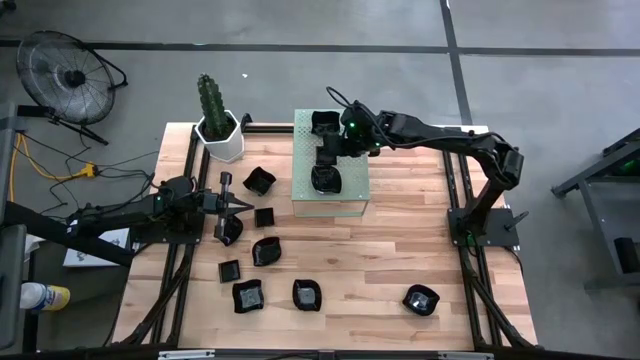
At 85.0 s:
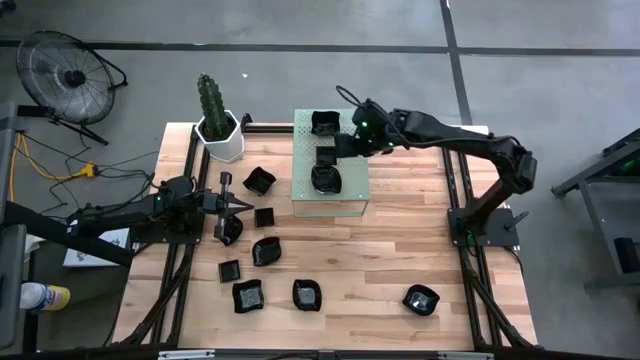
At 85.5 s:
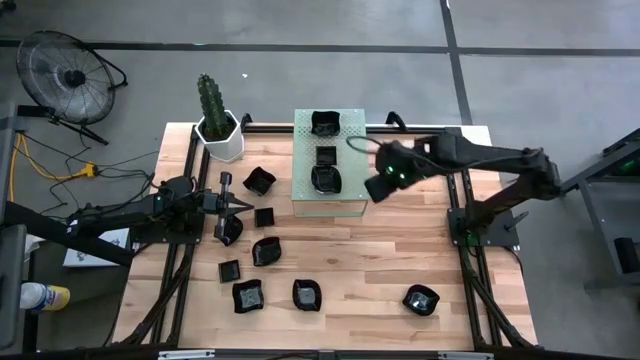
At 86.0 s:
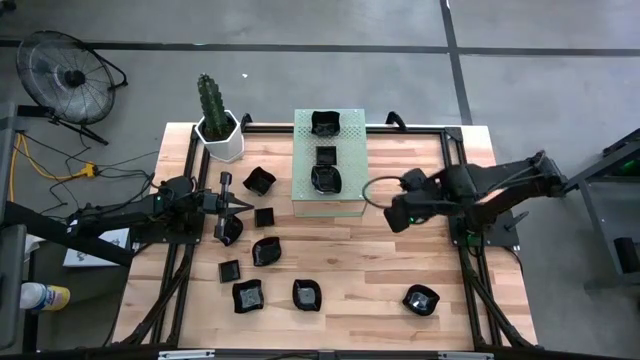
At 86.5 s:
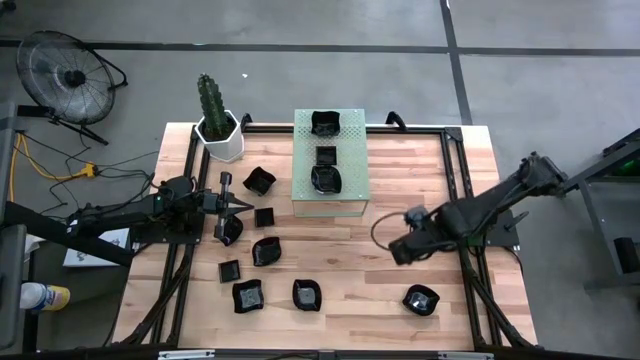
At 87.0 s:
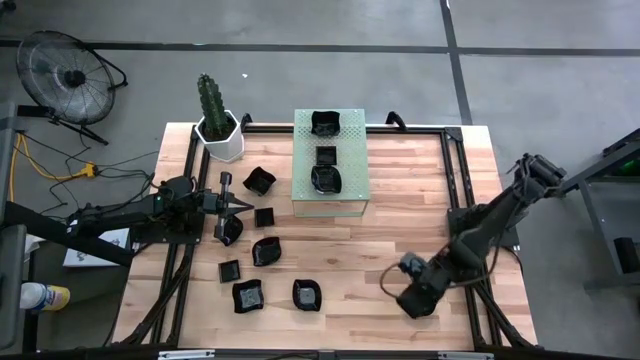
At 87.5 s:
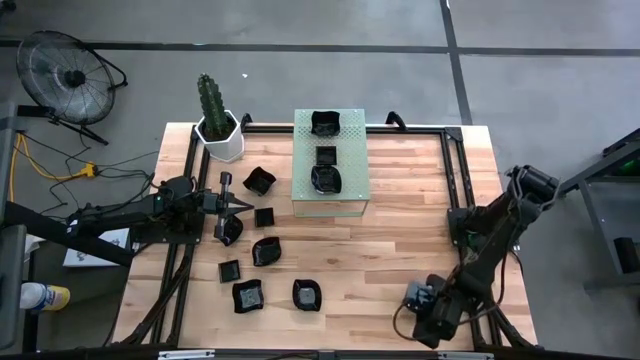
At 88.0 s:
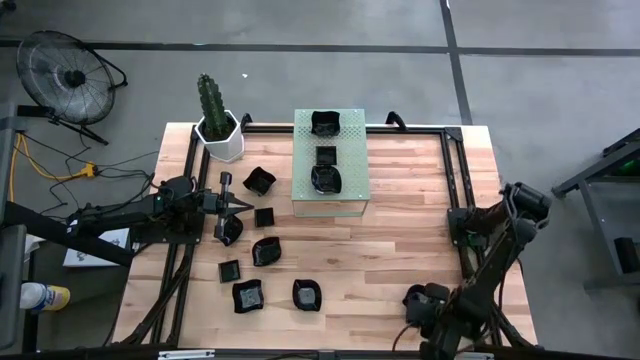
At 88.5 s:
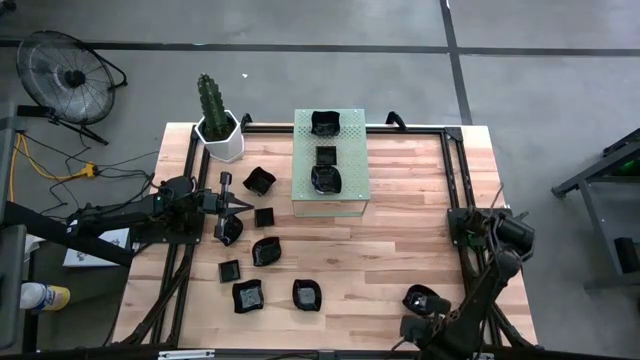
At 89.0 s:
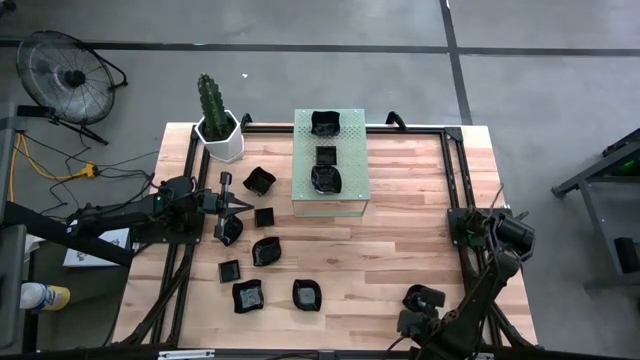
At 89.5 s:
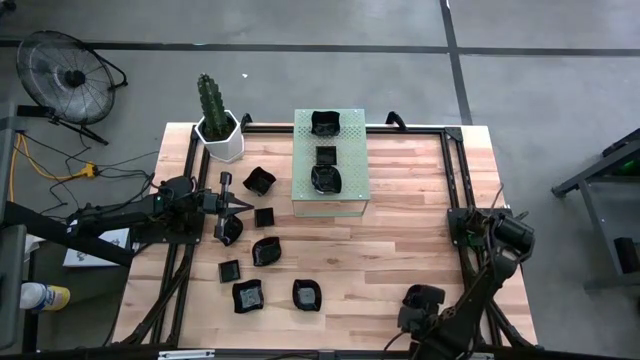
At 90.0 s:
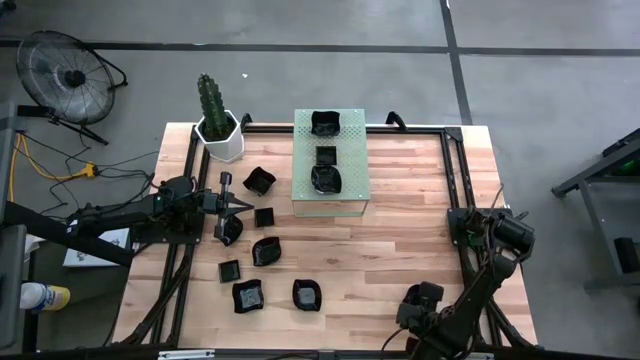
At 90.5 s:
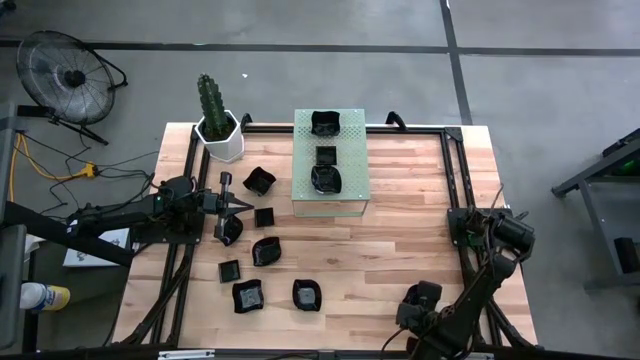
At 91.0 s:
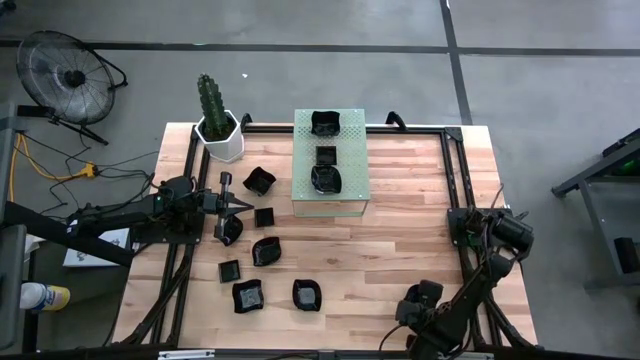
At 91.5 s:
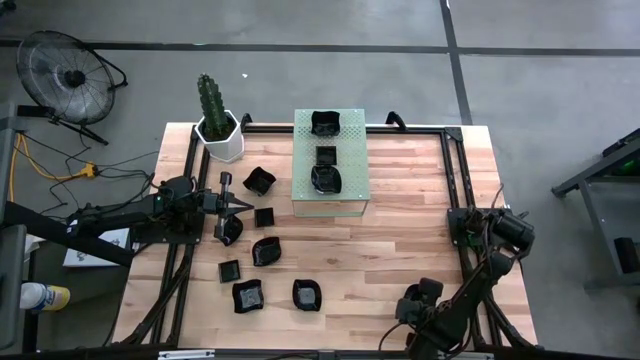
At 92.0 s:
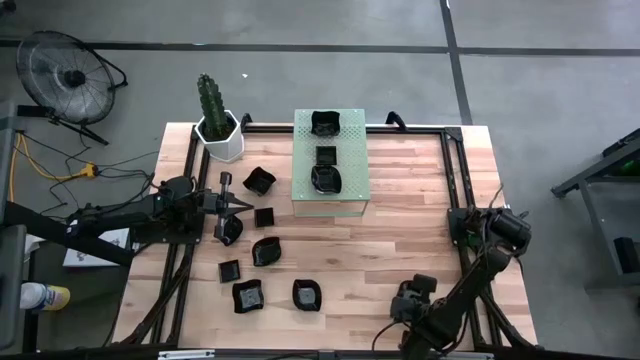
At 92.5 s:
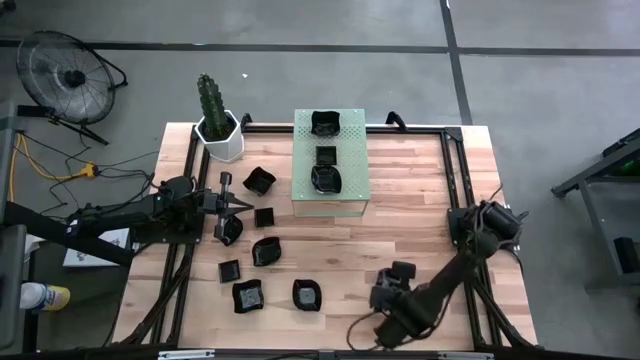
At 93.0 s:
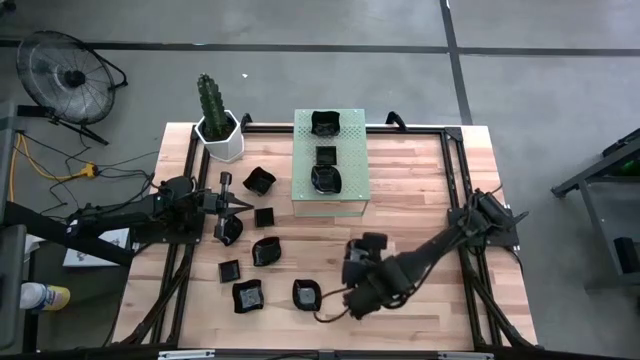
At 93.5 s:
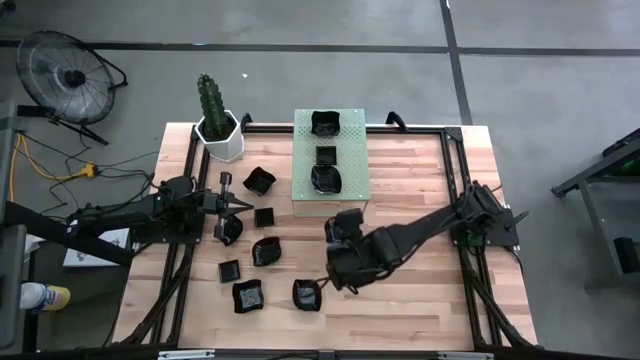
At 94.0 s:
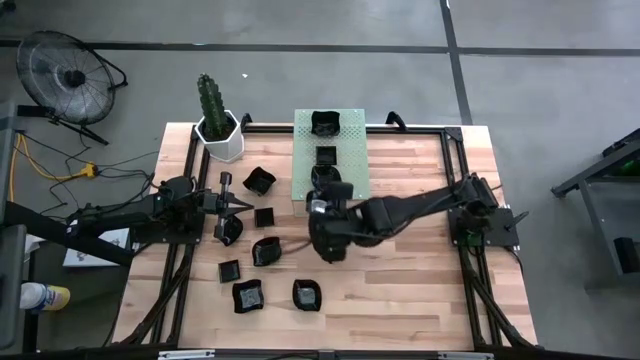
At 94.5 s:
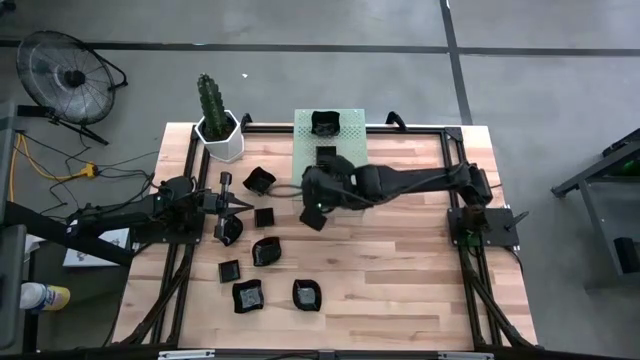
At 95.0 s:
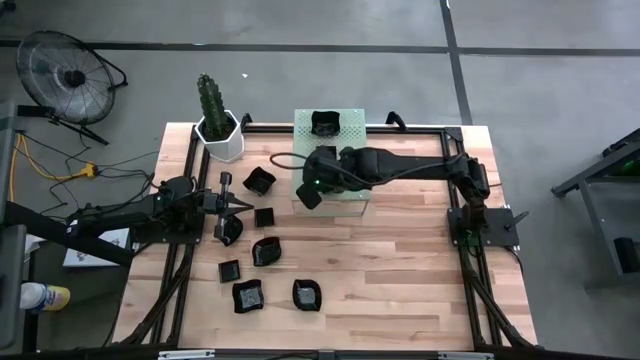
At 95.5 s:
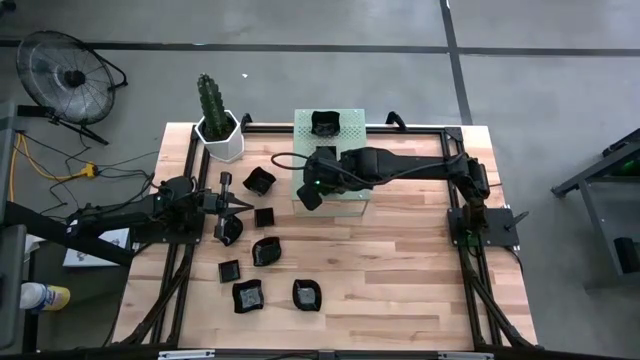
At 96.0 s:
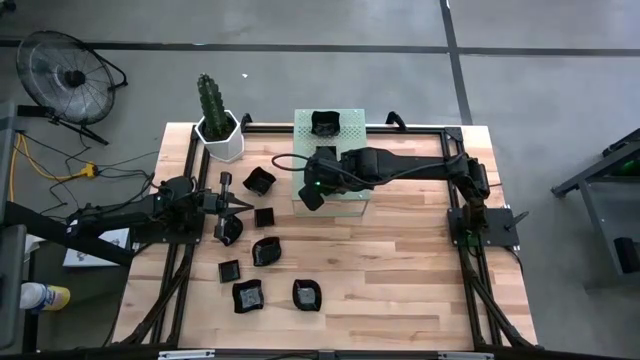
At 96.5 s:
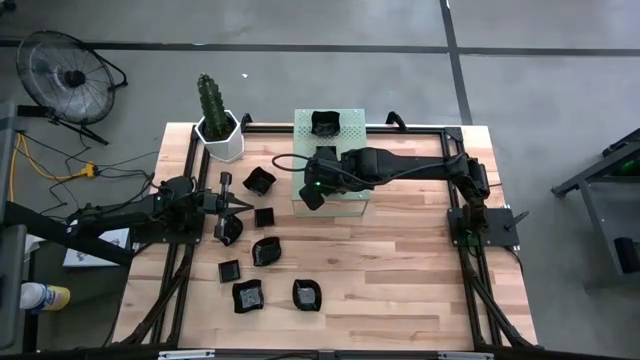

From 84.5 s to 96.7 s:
Task: Pick & Place Mini shaped plates
Stack the black leaf shaped plate on top of the black leaf shaped plate on the shelf

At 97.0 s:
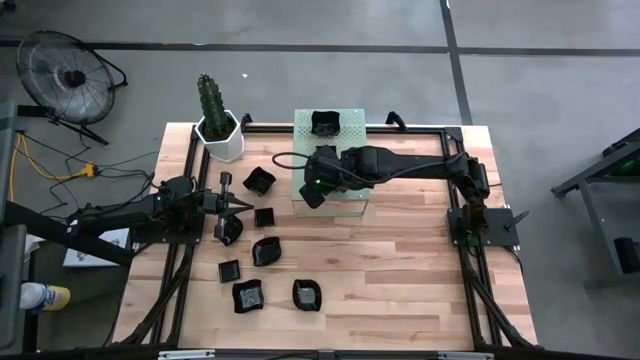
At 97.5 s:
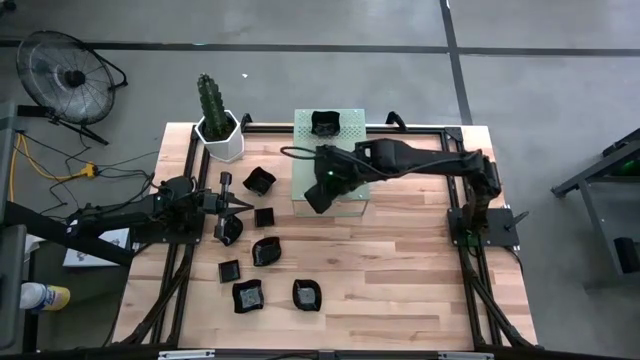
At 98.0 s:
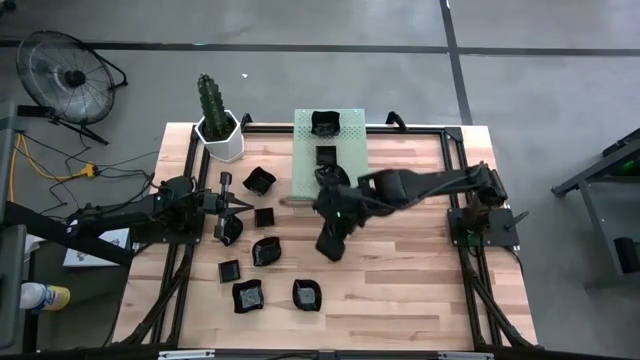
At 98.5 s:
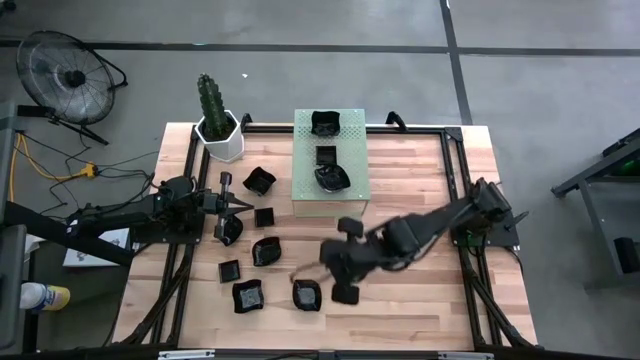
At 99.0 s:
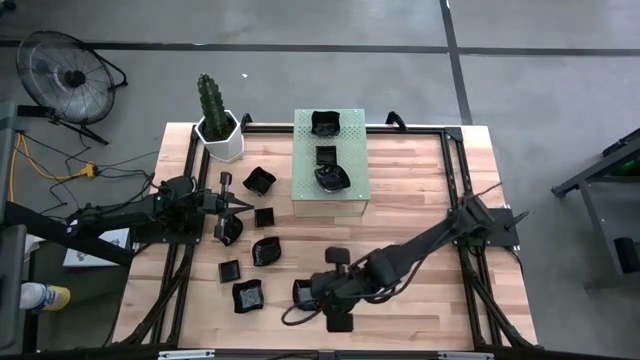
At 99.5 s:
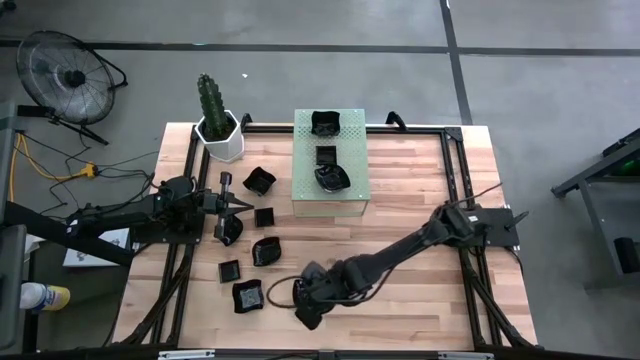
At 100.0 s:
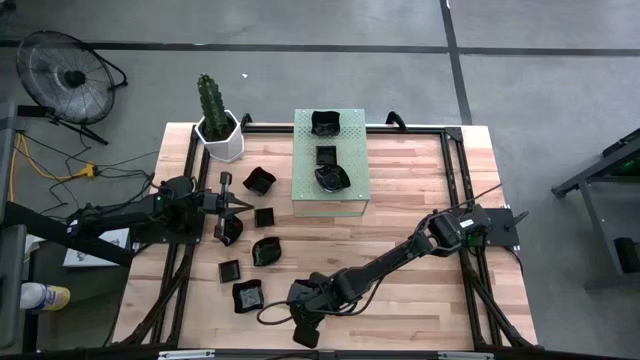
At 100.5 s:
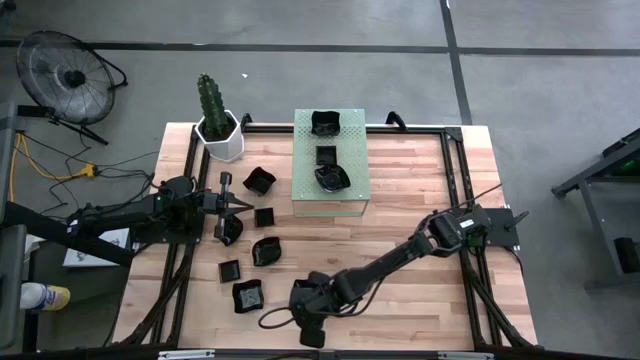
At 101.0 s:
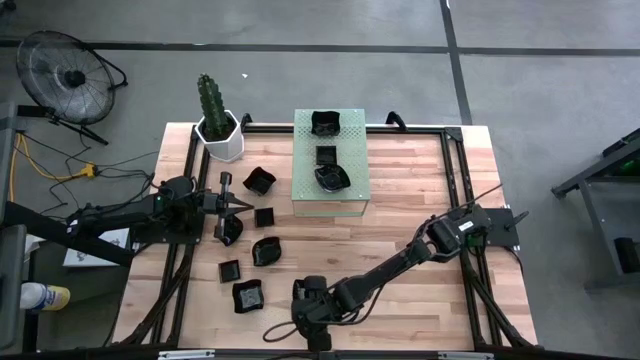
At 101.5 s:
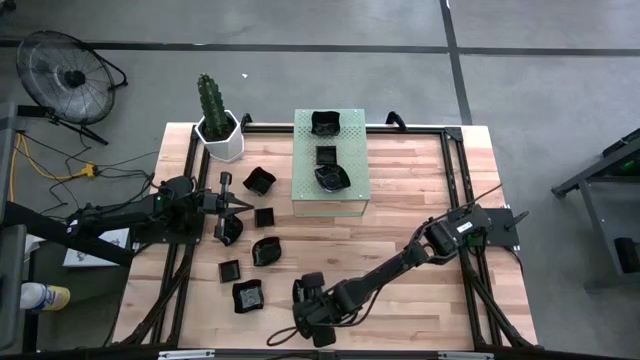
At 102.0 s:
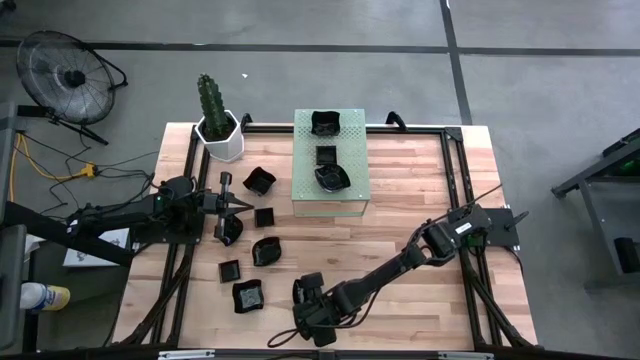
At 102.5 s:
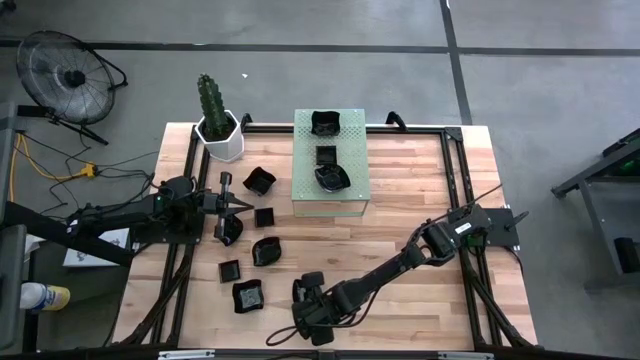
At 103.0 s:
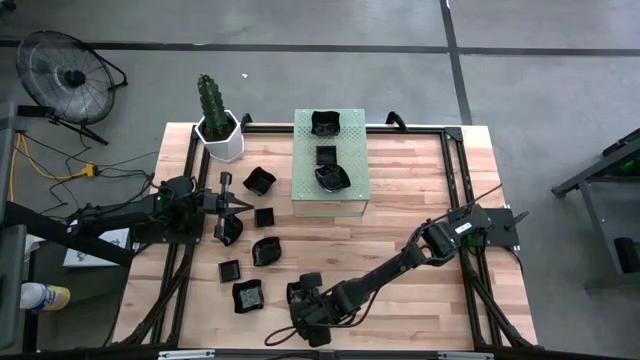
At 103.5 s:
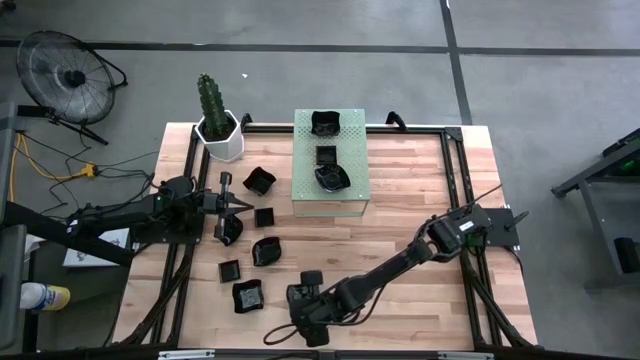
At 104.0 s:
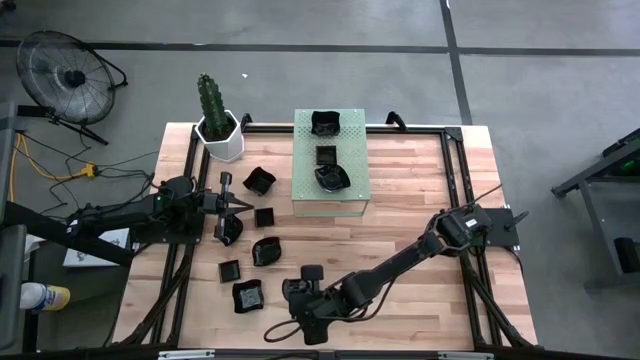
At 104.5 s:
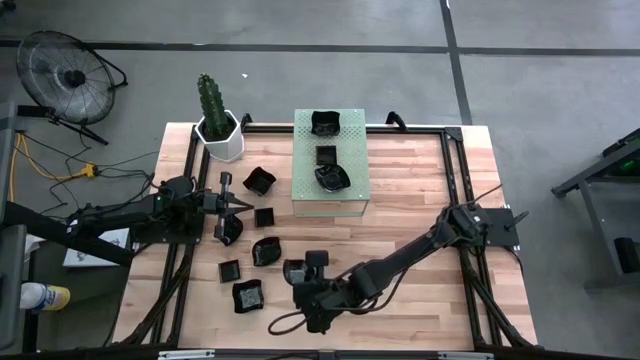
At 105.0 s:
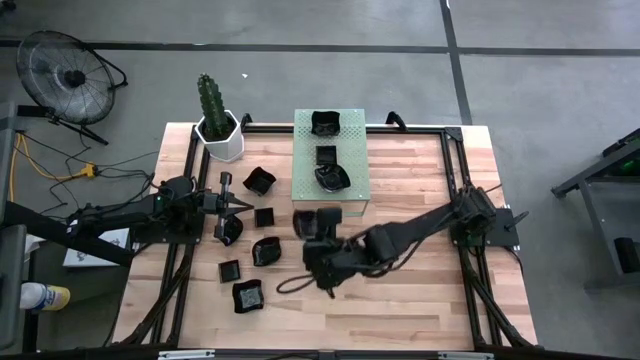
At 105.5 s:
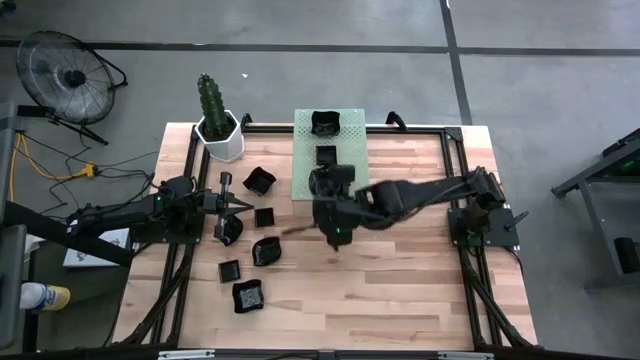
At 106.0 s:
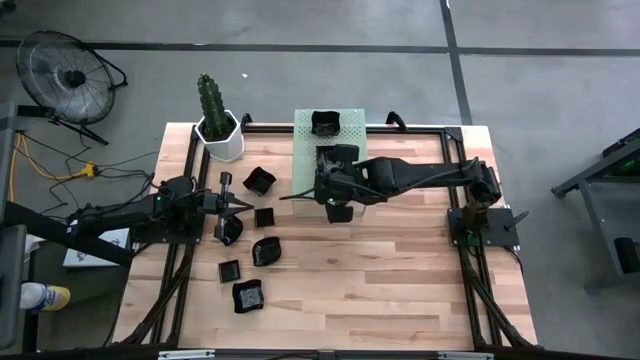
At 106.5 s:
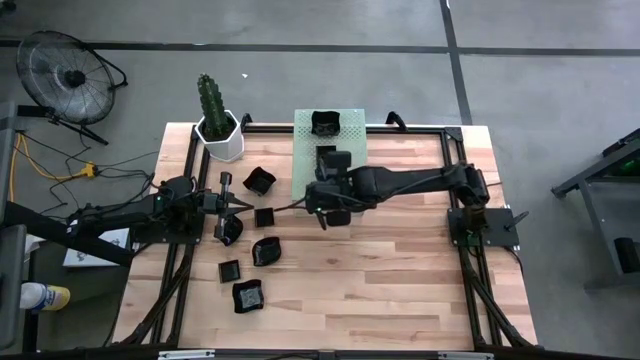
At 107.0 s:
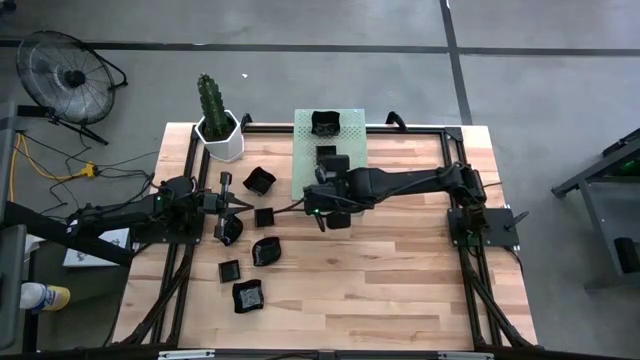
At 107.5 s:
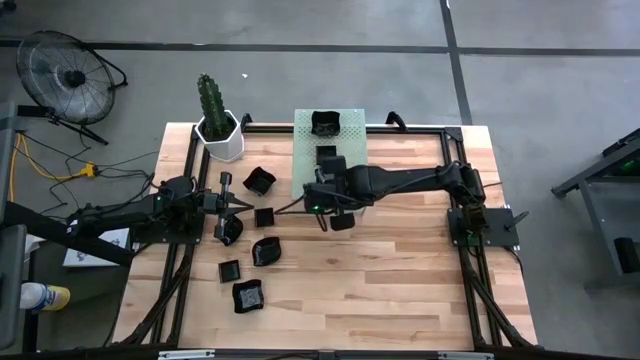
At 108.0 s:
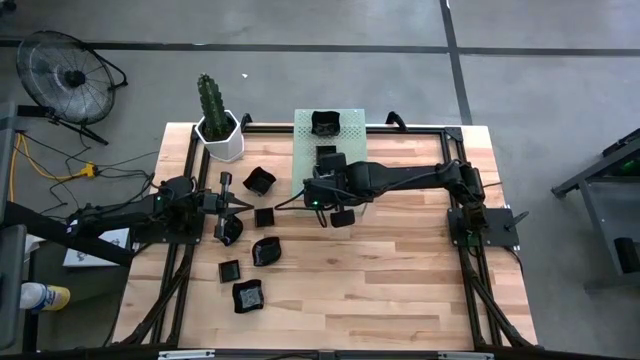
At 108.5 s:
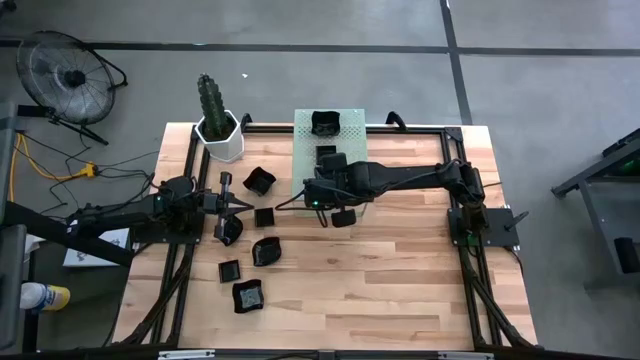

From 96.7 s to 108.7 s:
Stack the black leaf shaped plate on top of the black leaf shaped plate on the shelf
